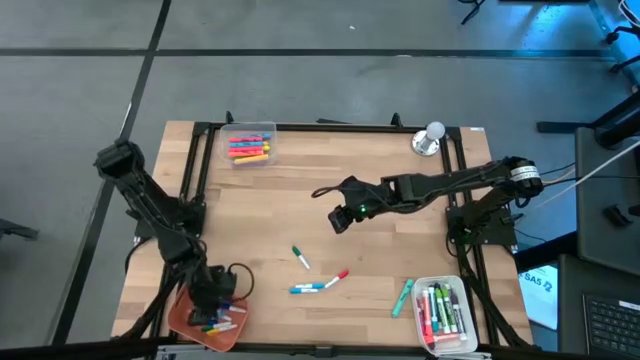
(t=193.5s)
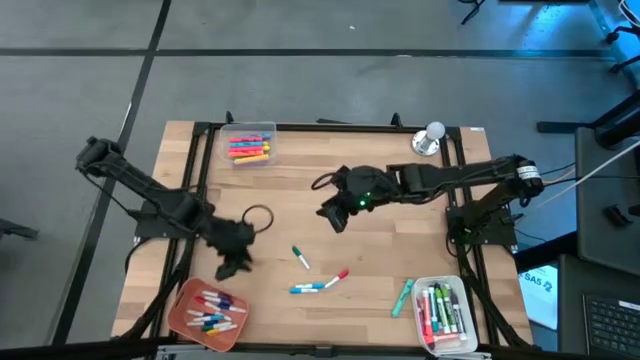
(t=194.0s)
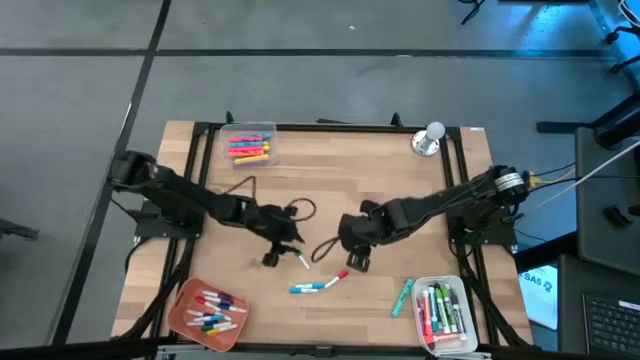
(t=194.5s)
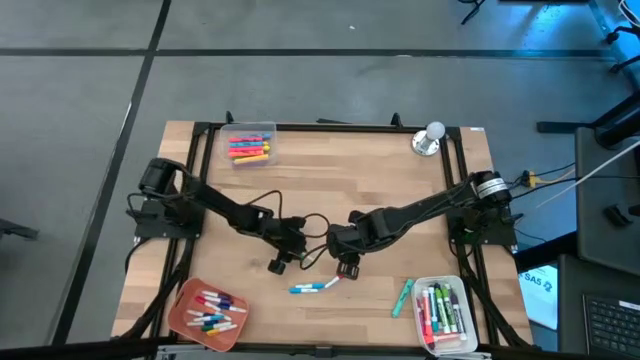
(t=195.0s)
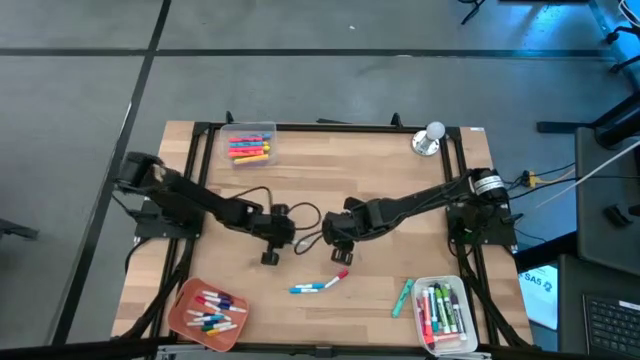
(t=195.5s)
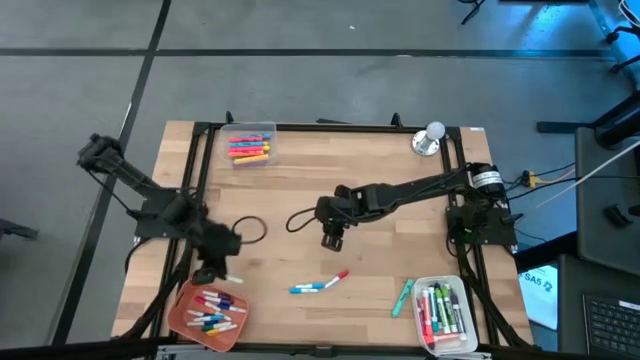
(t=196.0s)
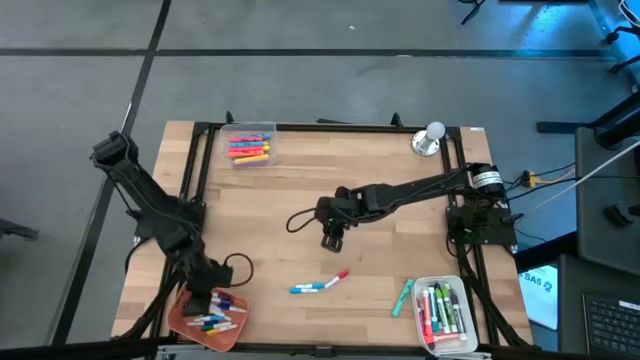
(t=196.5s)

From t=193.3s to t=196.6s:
Task: Pick & Place Markers
Put the bottom center pitch blue pen into the orange bin

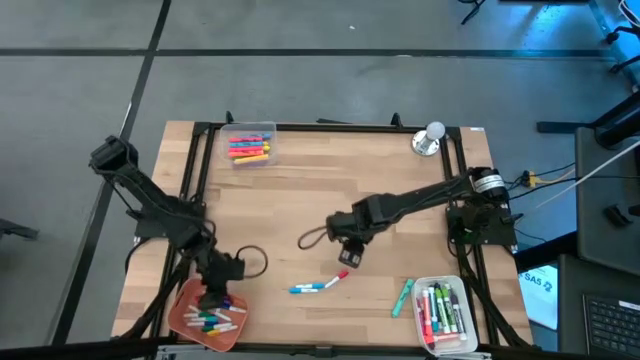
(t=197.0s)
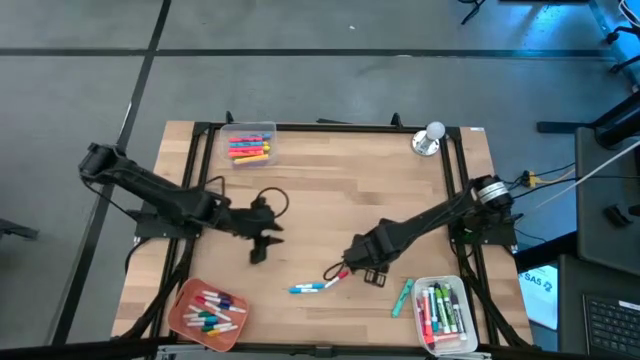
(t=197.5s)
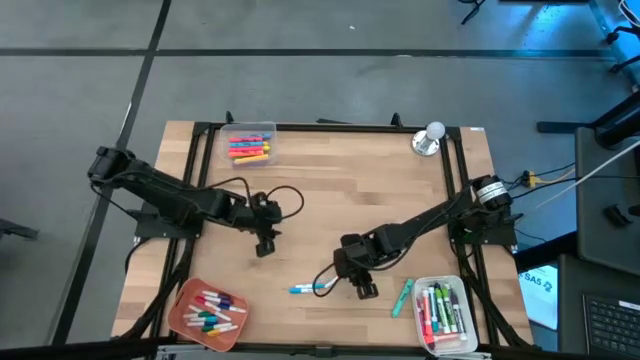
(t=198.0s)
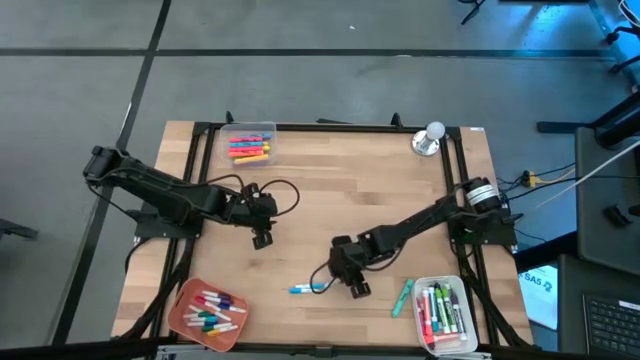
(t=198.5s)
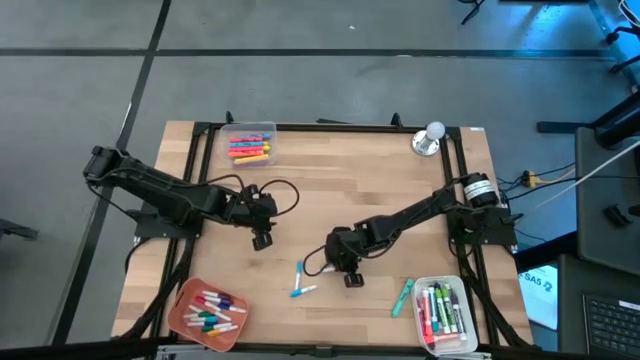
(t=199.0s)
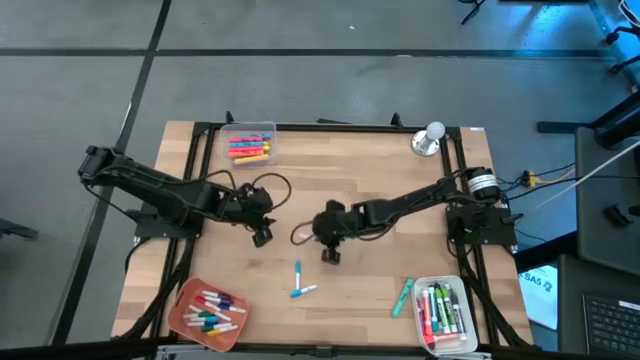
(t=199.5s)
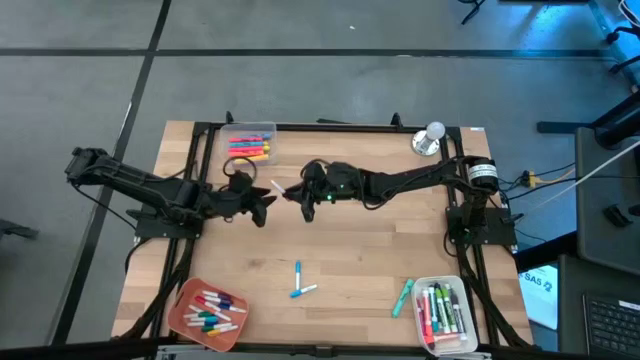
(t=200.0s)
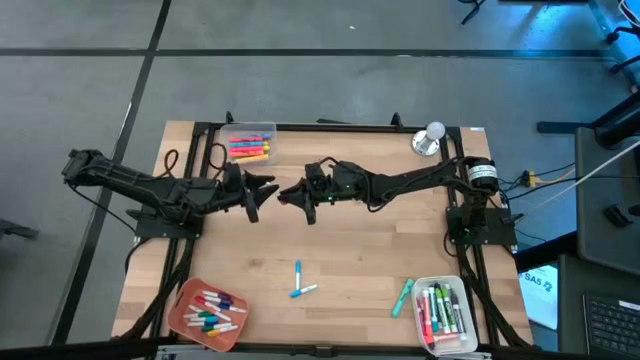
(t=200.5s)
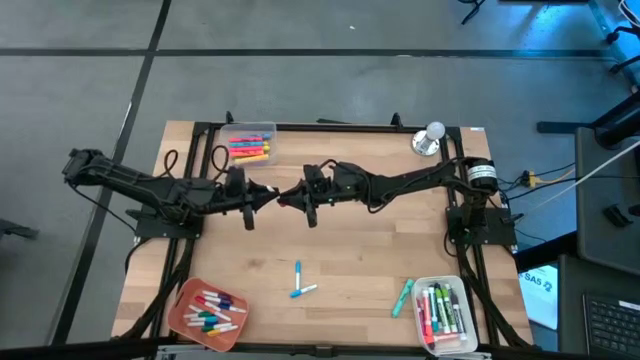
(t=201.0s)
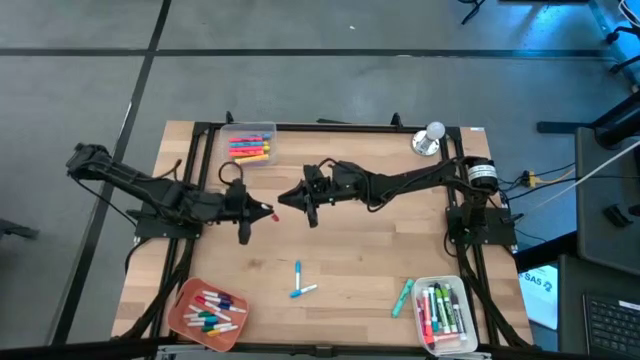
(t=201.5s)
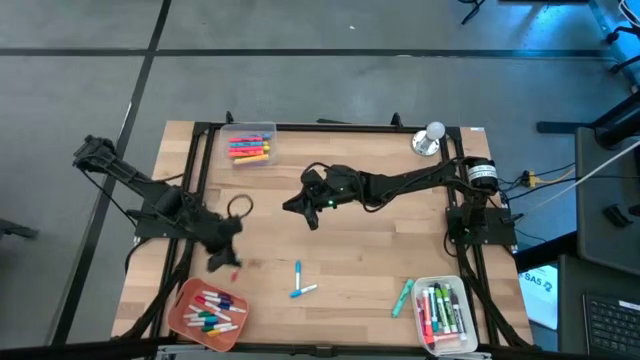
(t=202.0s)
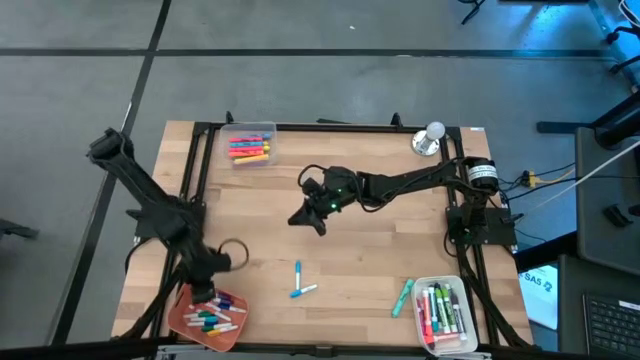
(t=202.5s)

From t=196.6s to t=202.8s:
Put the orange pen into the orange bin

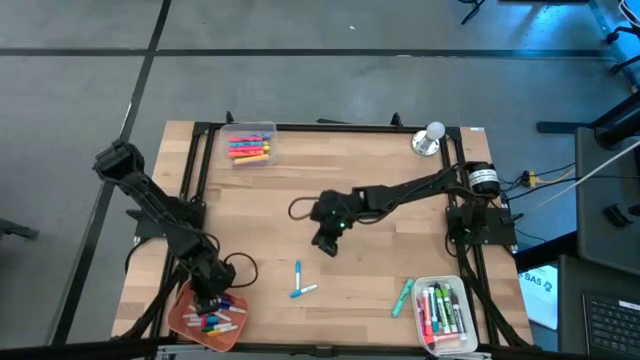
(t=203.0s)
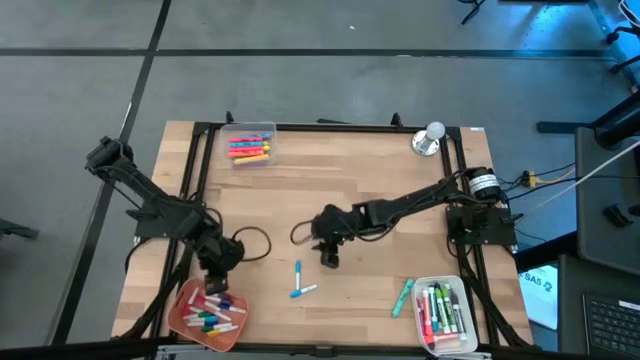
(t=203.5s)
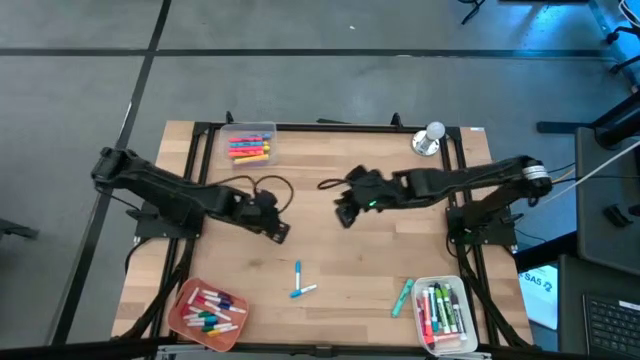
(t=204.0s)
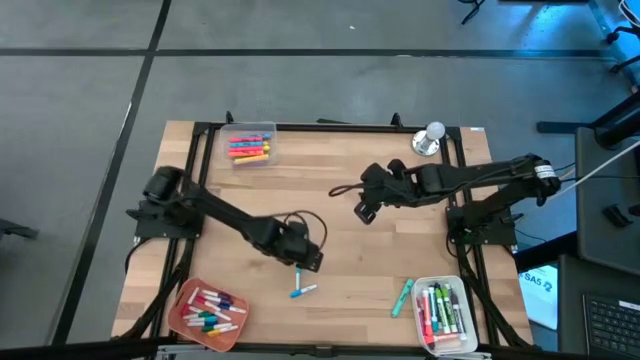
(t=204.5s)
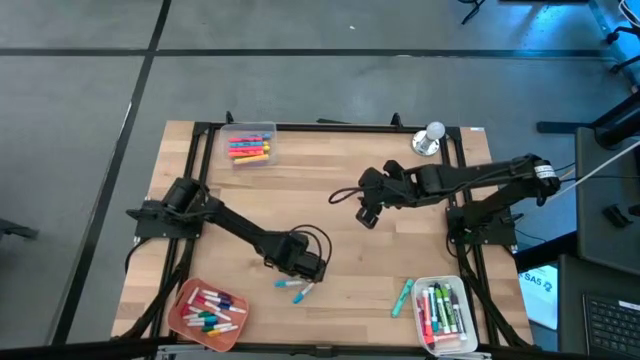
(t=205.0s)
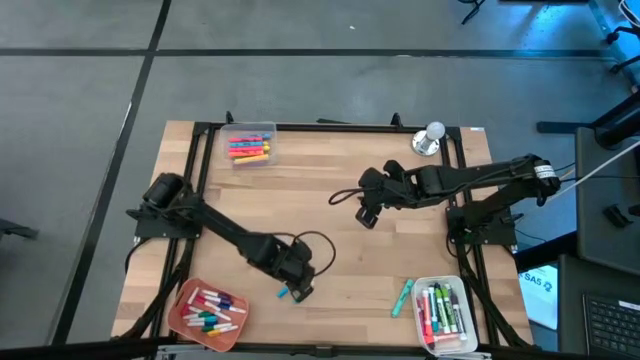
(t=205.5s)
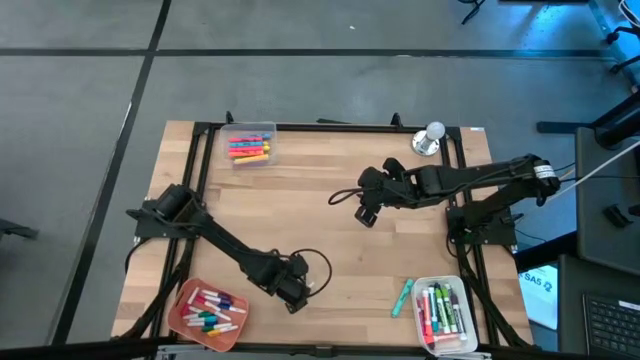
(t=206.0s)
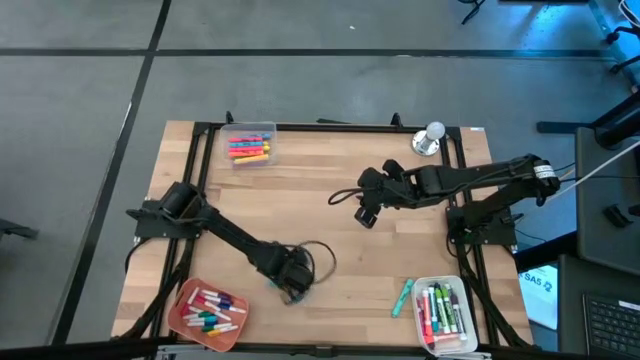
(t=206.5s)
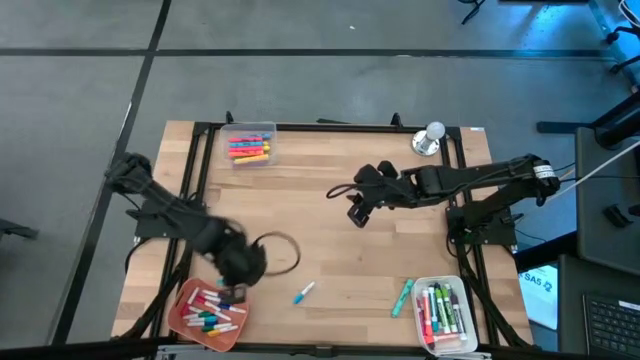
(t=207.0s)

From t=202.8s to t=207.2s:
Put the bottom center pitch blue pen into the orange bin

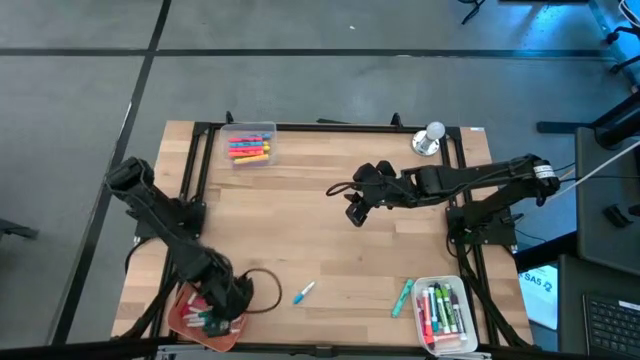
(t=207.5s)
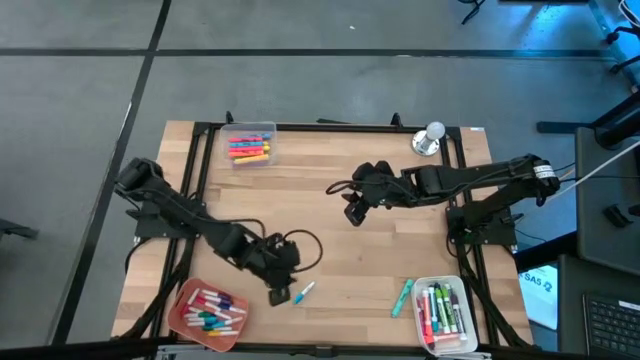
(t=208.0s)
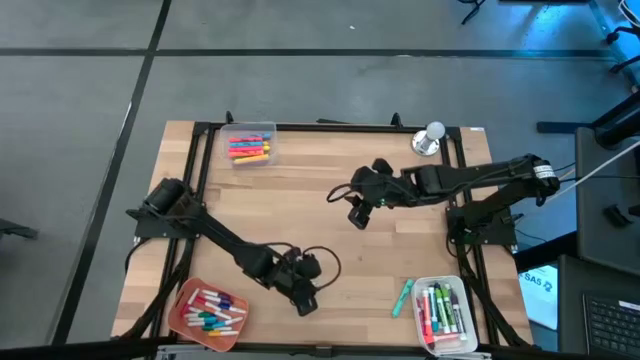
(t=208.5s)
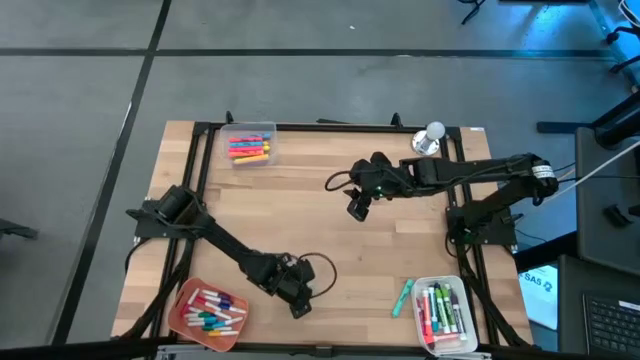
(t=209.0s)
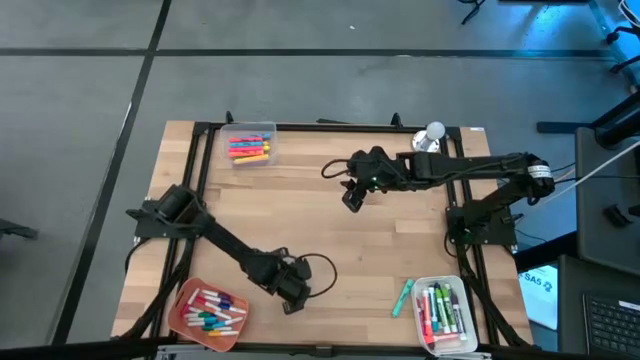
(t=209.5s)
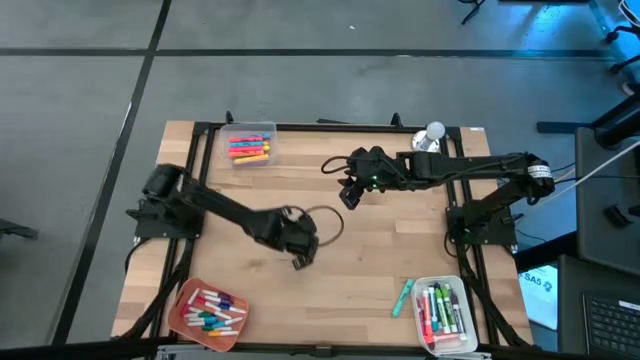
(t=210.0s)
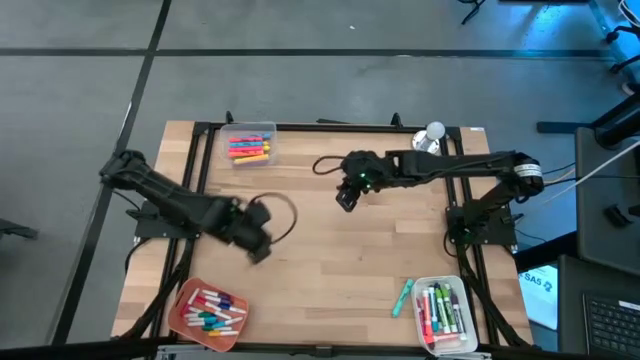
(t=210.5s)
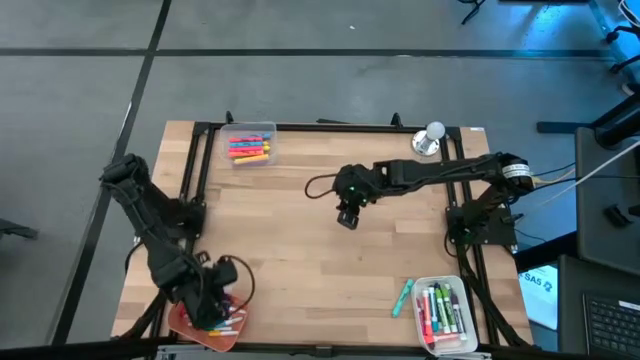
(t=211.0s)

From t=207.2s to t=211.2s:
Put the bottom center pitch blue pen into the orange bin

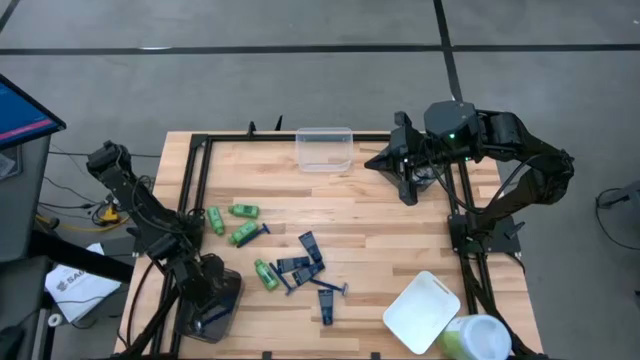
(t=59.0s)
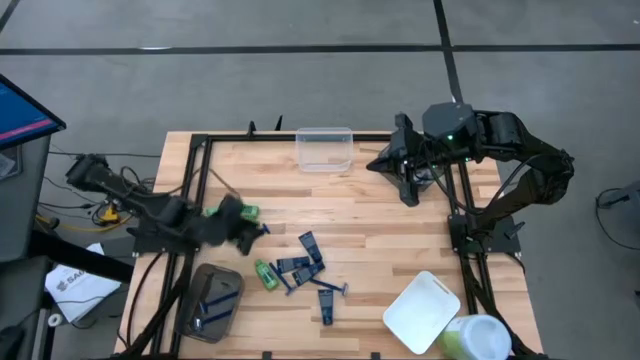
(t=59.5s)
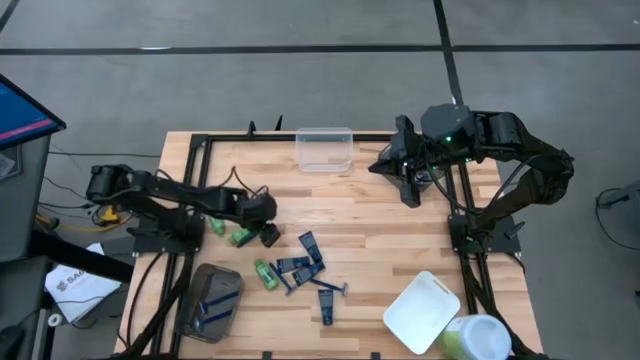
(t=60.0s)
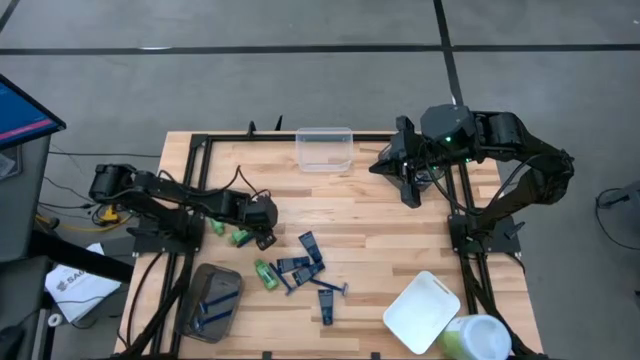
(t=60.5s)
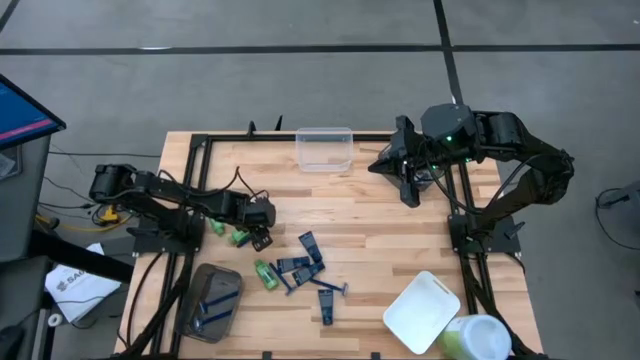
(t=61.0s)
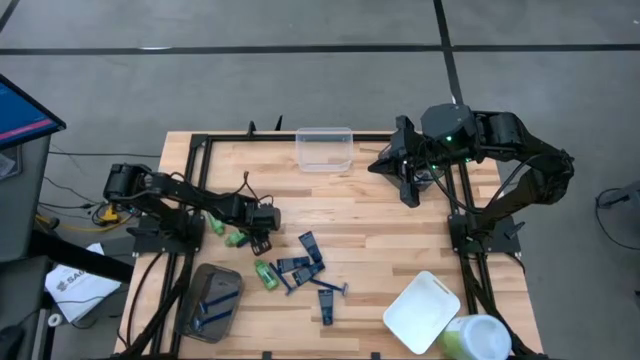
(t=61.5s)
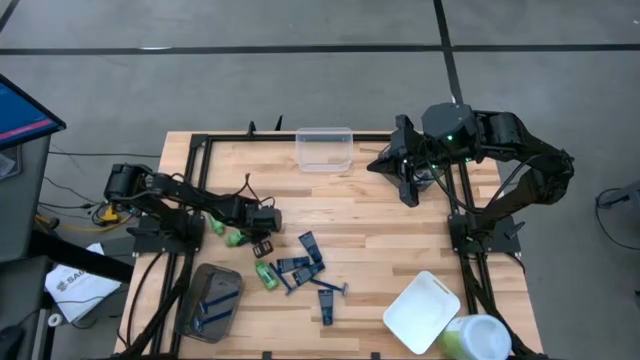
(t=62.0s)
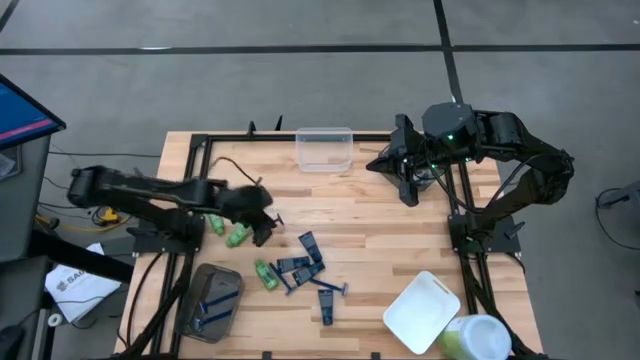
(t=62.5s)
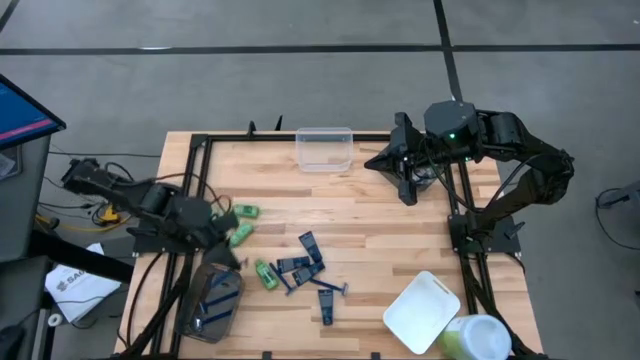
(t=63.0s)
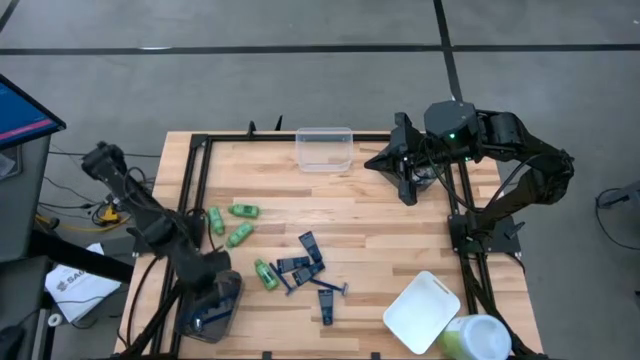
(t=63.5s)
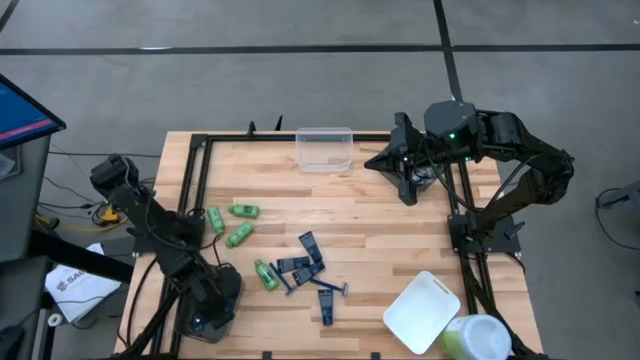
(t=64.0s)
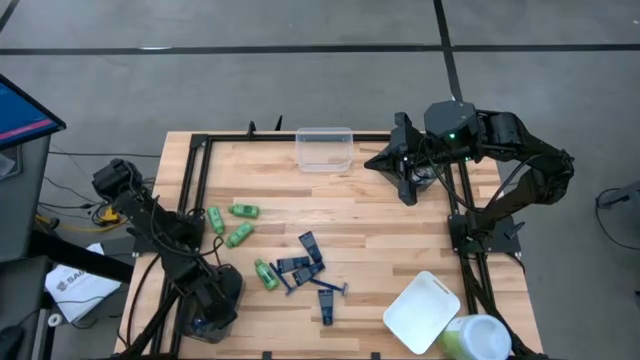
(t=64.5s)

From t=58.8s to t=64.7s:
Task: Pick & Place Travel size toiletries
Put the blue razor into the bottom black bin
